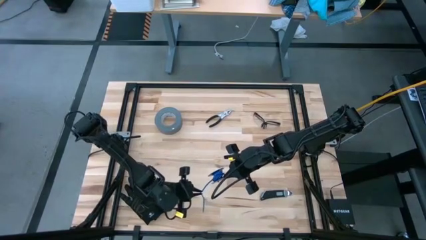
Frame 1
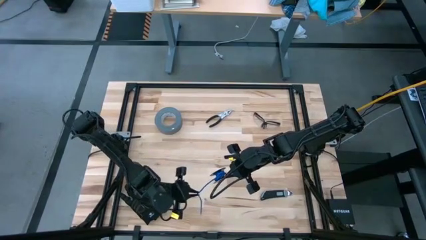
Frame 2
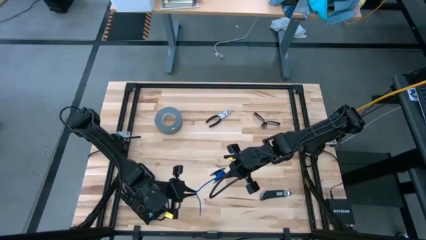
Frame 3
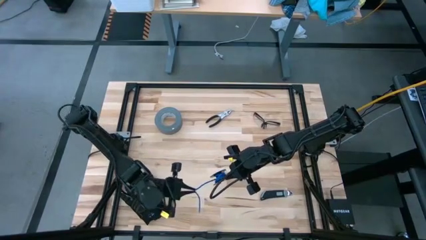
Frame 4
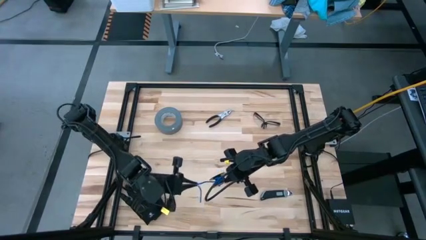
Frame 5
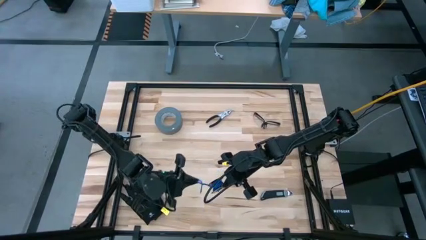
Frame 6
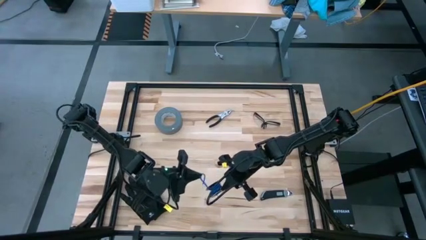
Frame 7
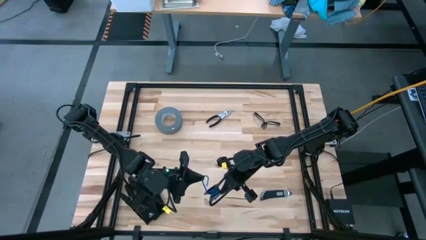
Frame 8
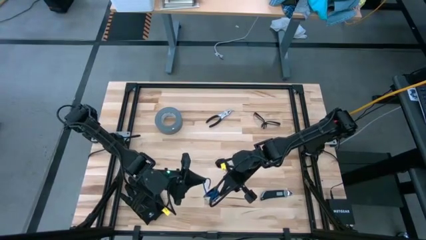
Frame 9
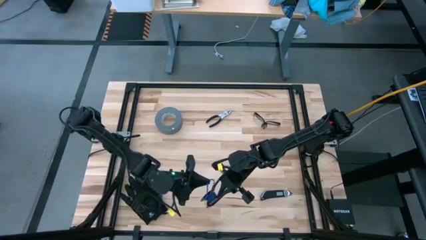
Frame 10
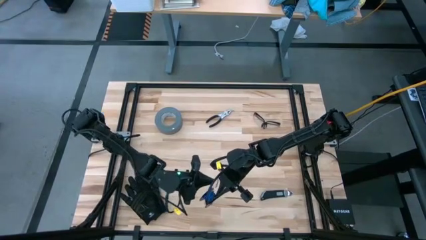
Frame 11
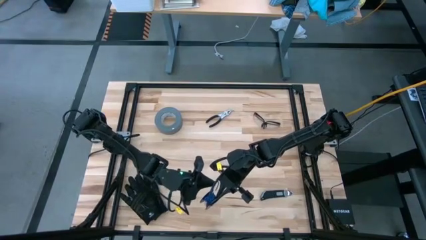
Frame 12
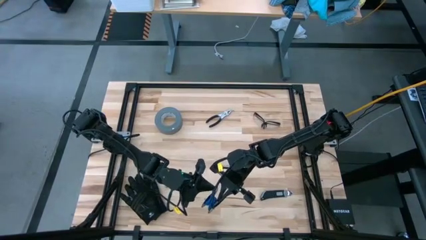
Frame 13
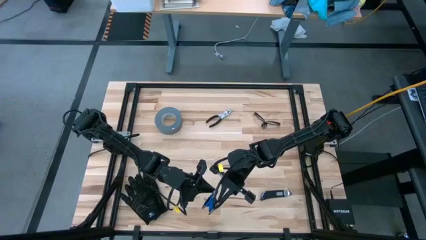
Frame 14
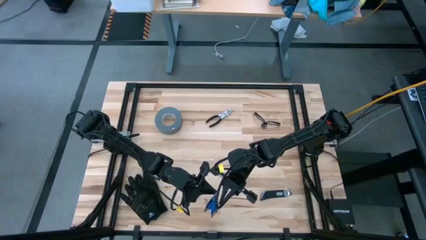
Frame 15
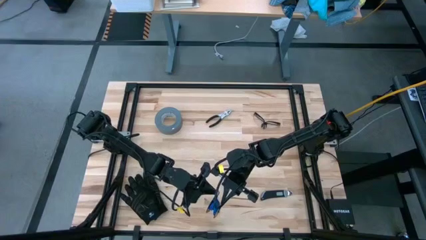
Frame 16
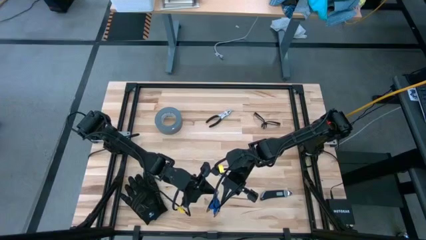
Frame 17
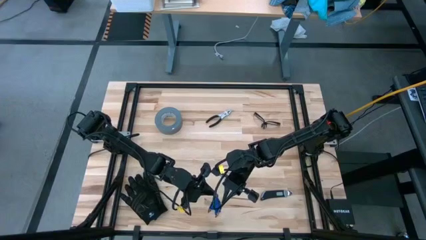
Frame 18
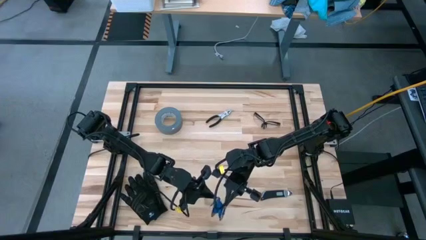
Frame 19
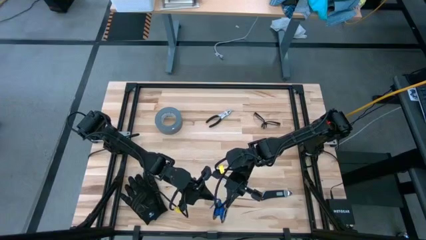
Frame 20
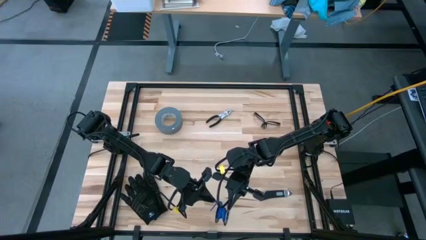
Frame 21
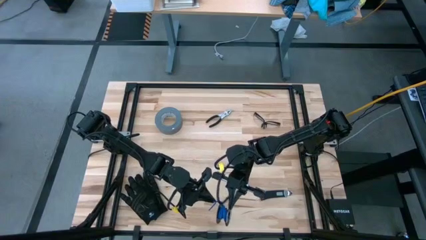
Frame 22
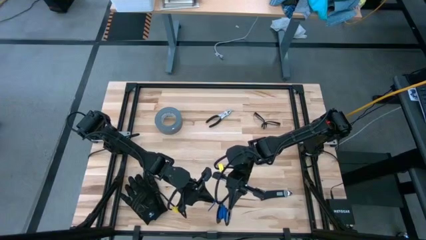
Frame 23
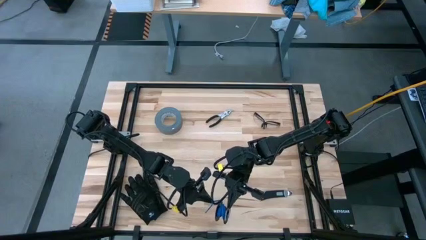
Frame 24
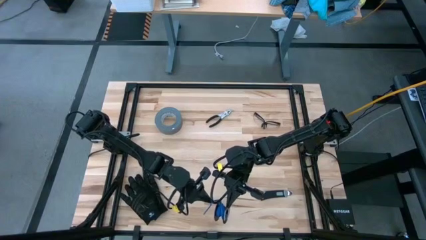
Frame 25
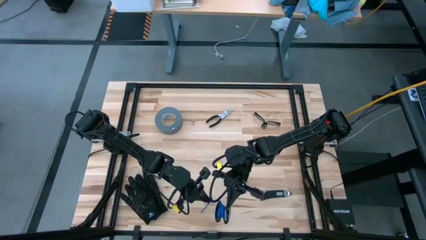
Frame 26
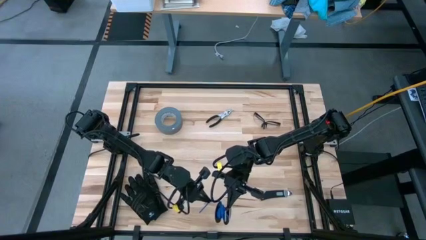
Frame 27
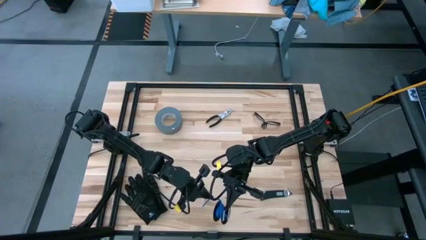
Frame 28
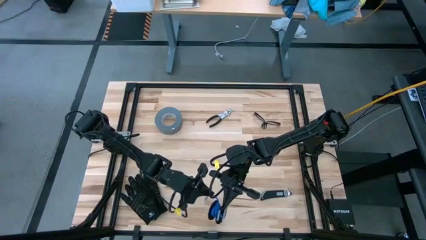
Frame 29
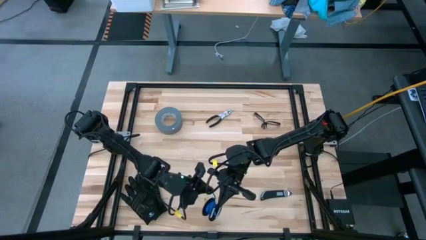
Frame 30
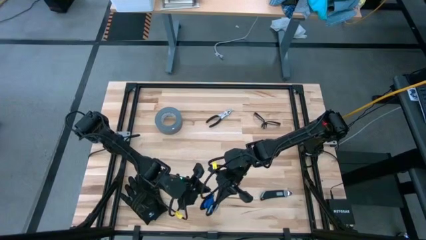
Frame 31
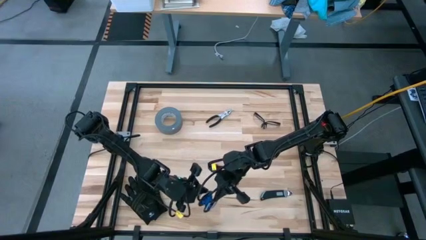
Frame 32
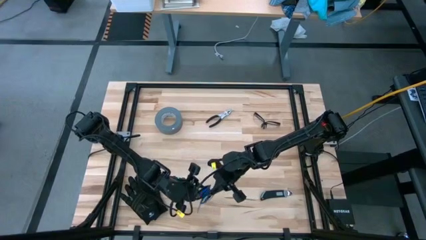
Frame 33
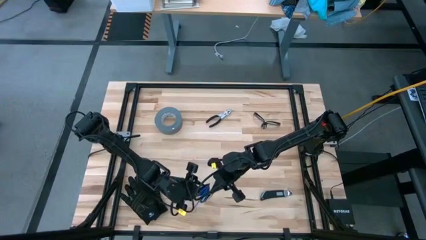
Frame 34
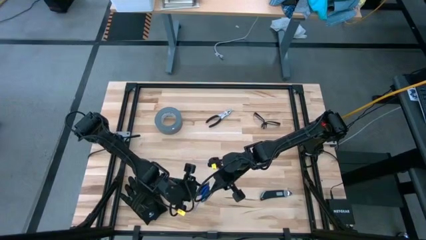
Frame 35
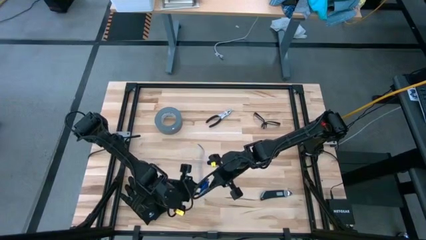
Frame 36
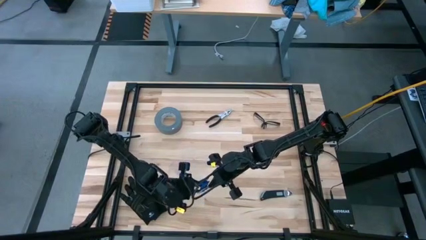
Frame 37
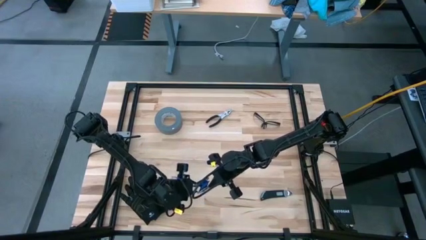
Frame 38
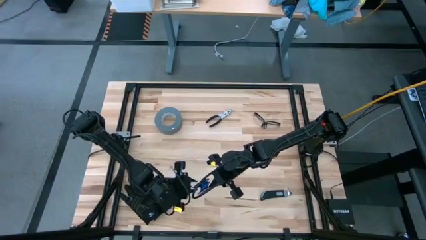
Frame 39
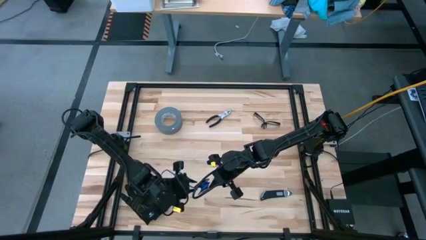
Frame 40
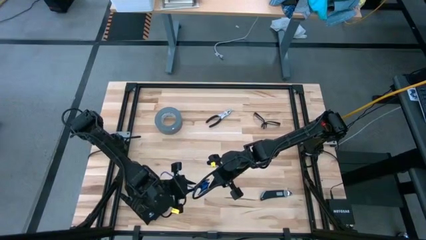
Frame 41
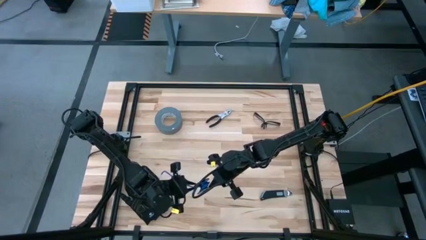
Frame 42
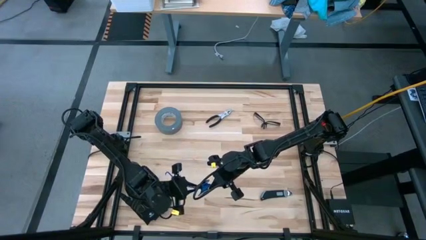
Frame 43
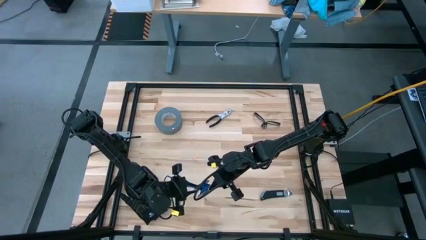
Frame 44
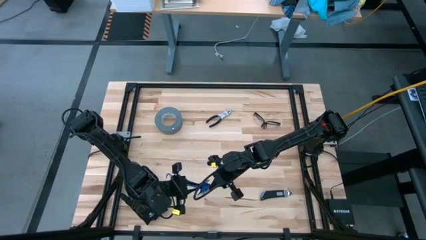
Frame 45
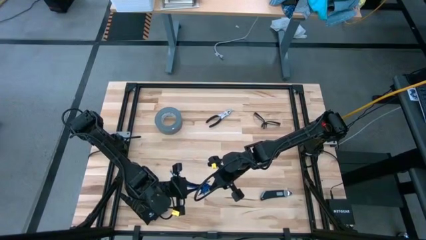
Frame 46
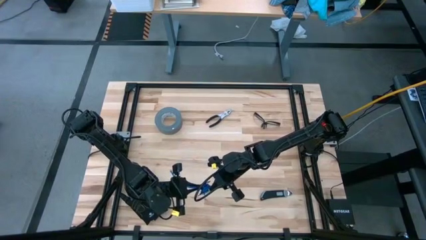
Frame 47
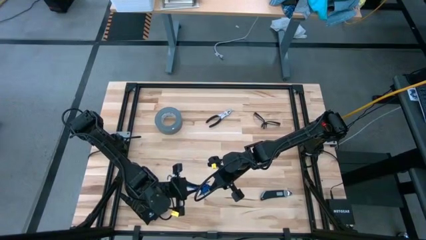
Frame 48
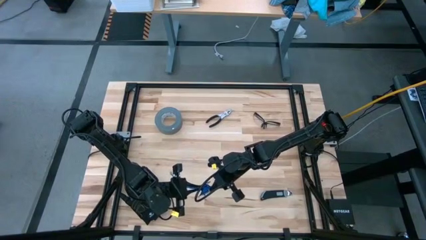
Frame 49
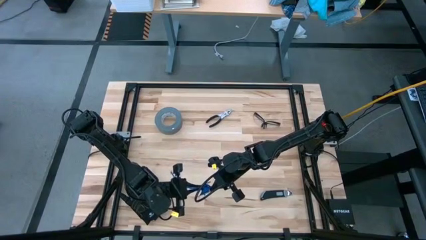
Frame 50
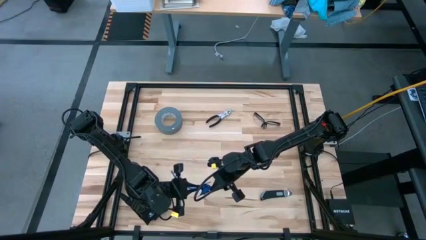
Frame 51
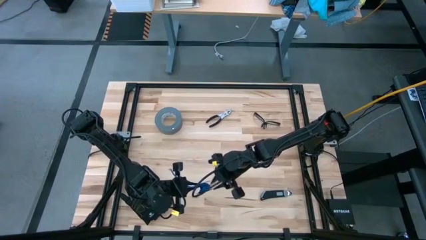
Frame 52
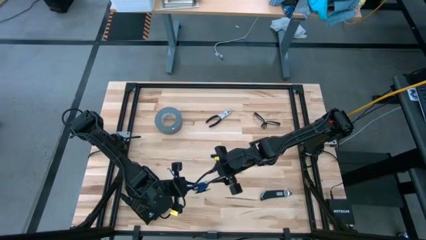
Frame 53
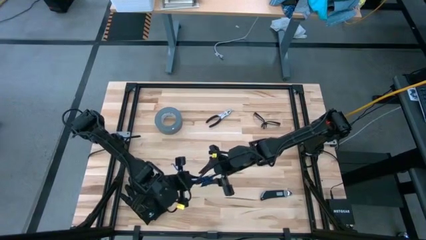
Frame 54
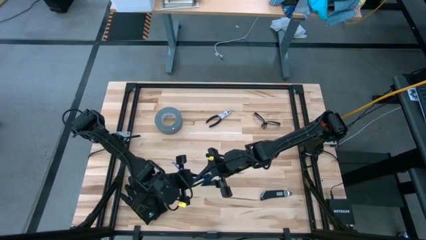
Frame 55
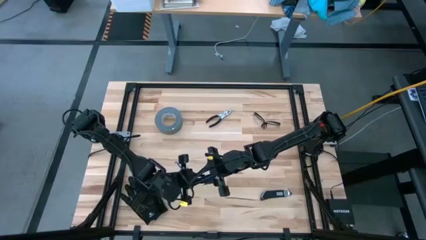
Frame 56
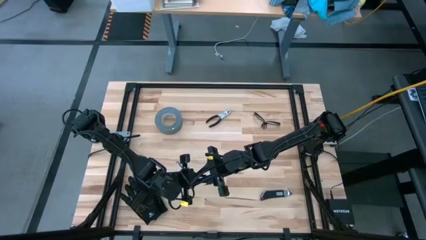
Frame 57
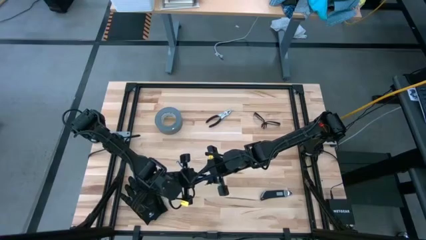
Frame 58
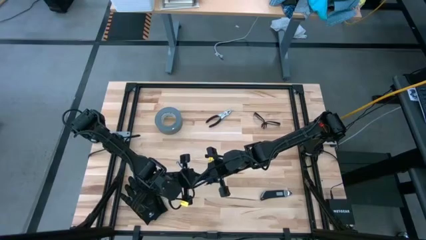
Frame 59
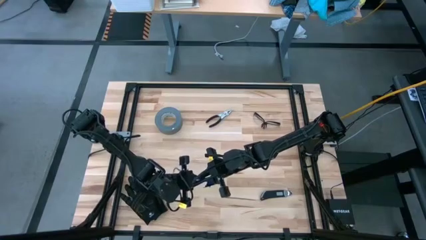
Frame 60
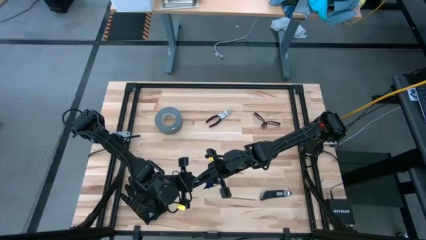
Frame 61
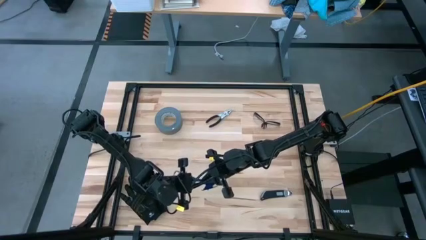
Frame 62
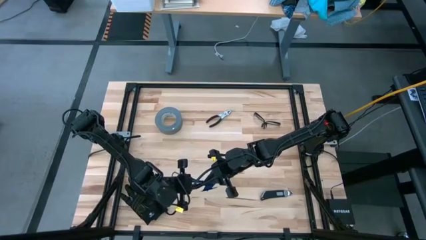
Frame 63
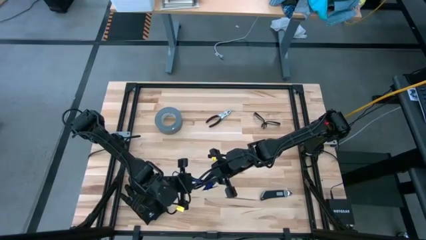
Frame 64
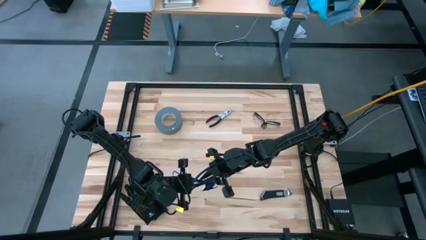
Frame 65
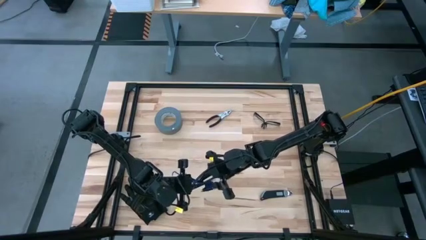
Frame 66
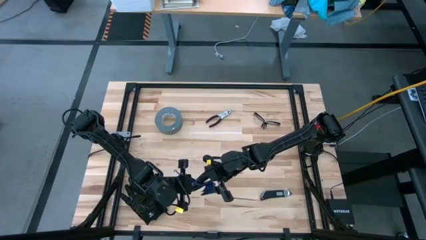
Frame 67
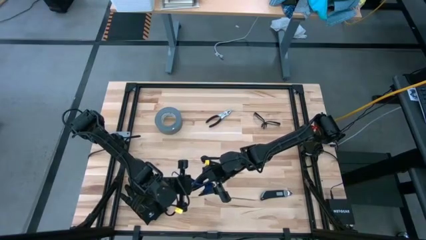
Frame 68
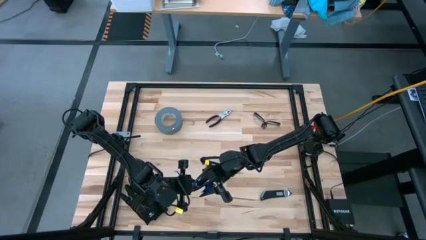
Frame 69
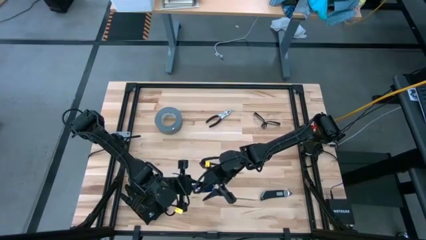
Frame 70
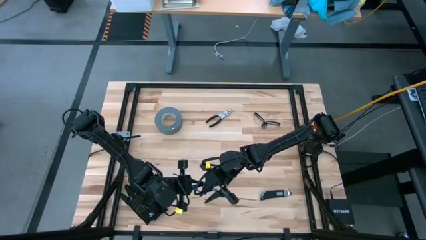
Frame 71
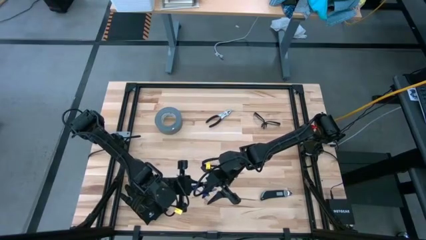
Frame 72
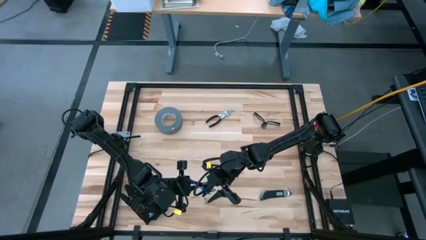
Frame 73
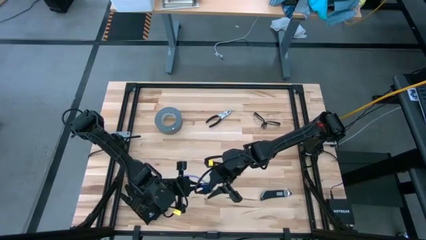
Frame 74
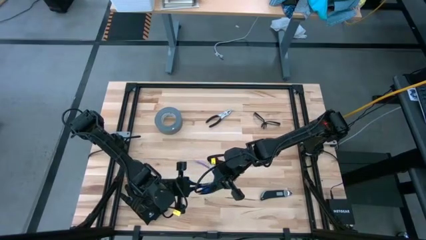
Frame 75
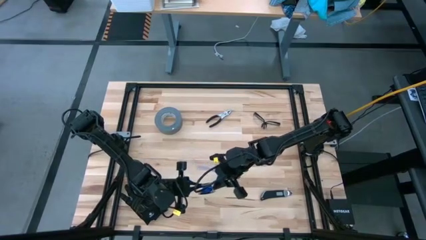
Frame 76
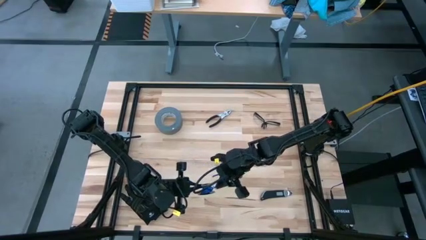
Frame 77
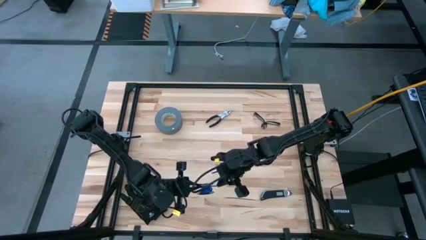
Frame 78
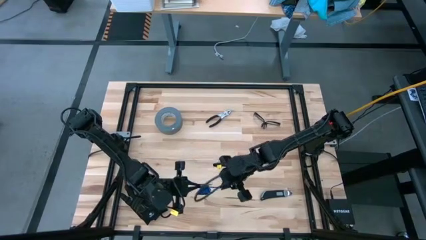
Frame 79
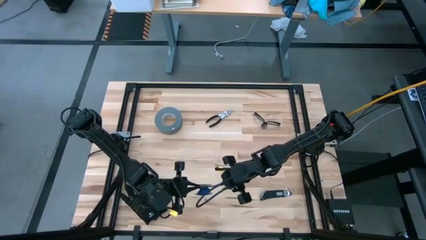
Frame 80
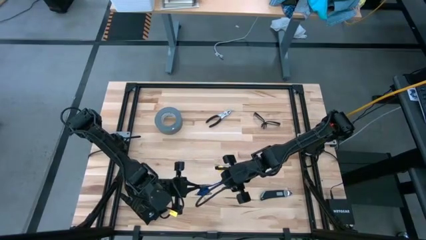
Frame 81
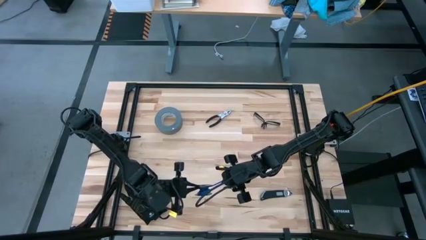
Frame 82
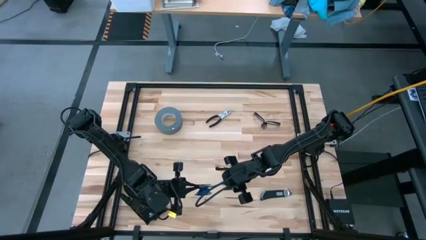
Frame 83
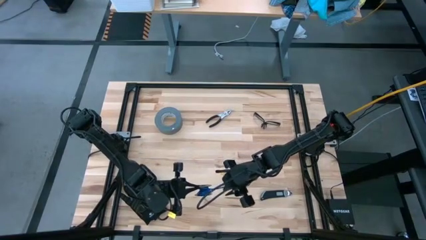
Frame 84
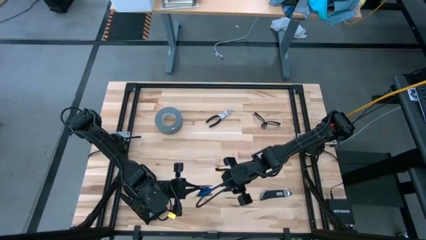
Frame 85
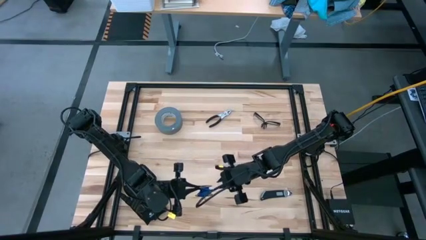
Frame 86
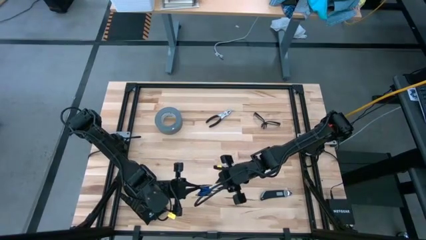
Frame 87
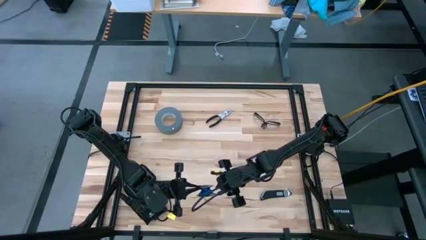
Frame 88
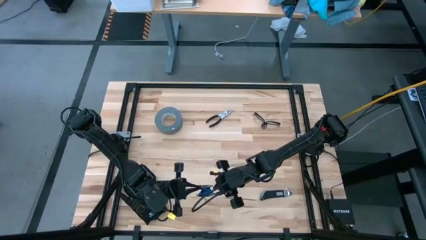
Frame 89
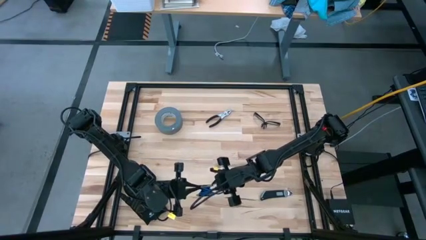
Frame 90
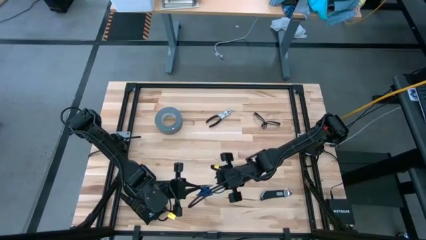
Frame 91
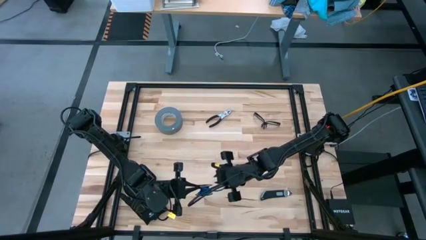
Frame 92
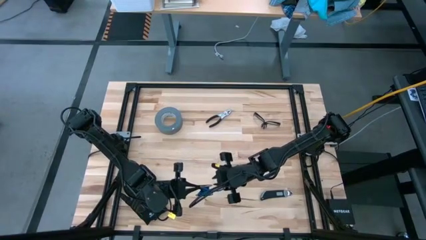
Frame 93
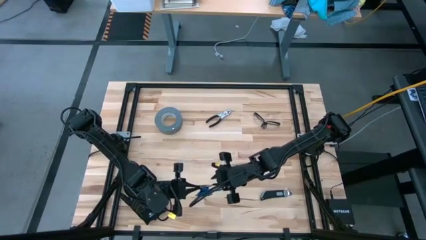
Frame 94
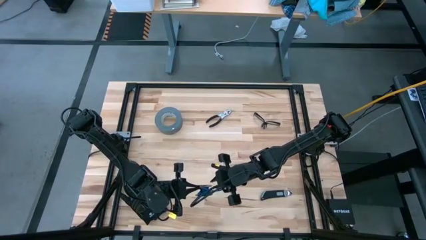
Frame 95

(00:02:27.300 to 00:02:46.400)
Task: Coil cords
Coil the blue wire cable onto the black spool
